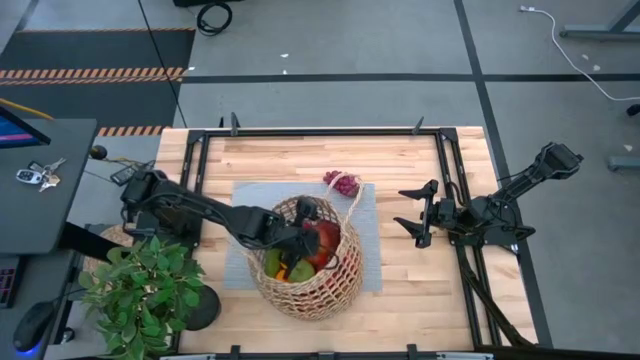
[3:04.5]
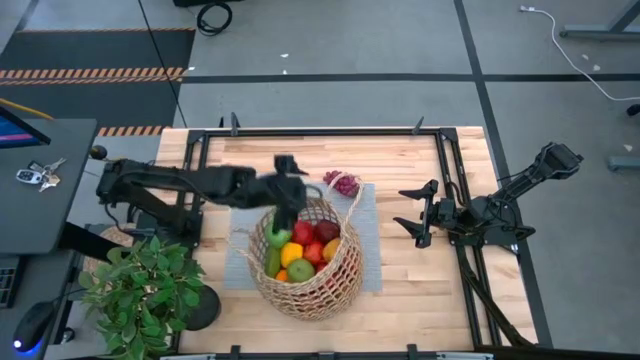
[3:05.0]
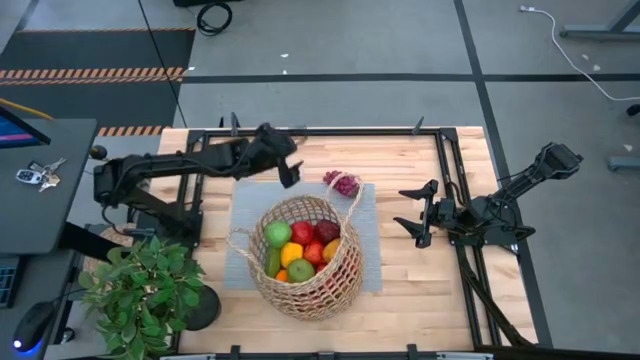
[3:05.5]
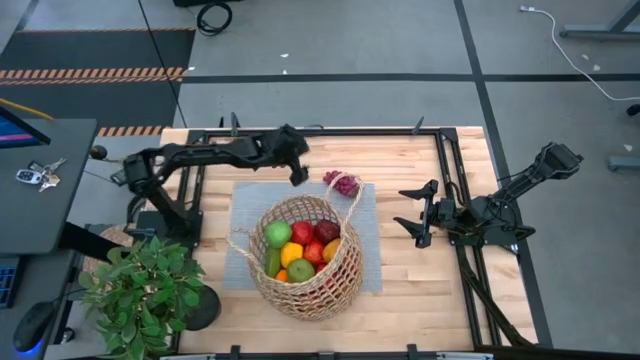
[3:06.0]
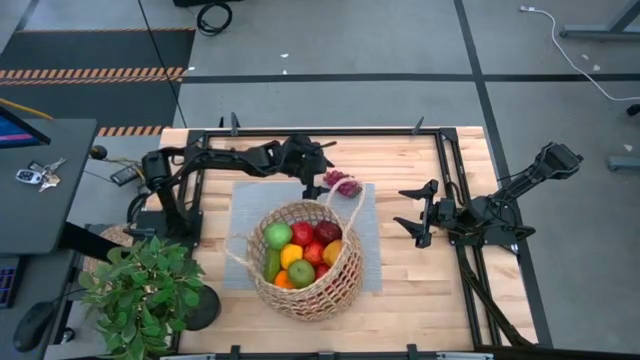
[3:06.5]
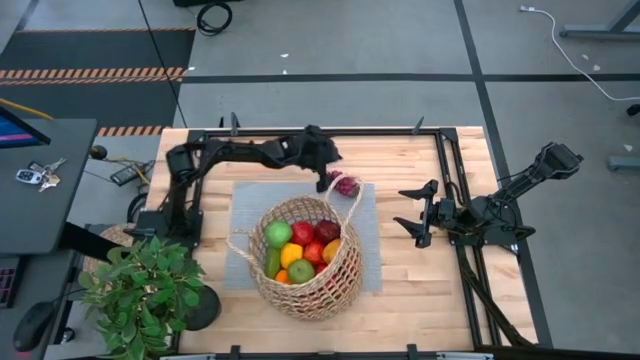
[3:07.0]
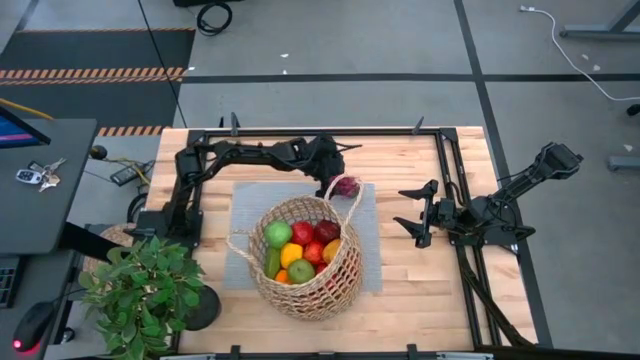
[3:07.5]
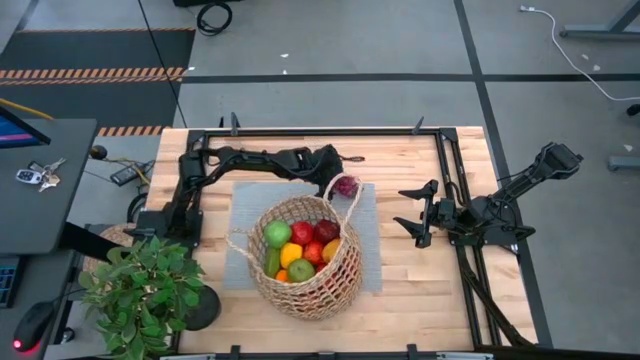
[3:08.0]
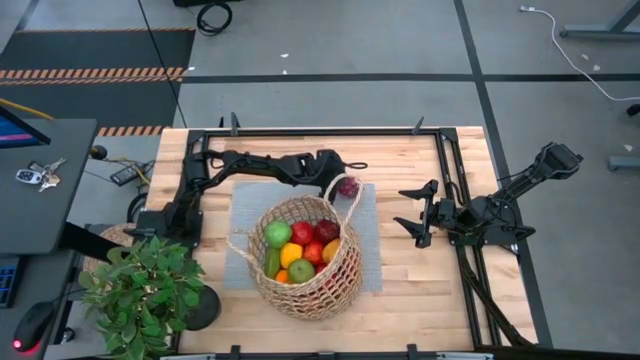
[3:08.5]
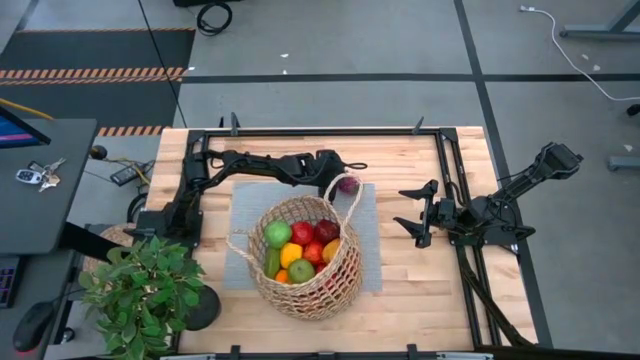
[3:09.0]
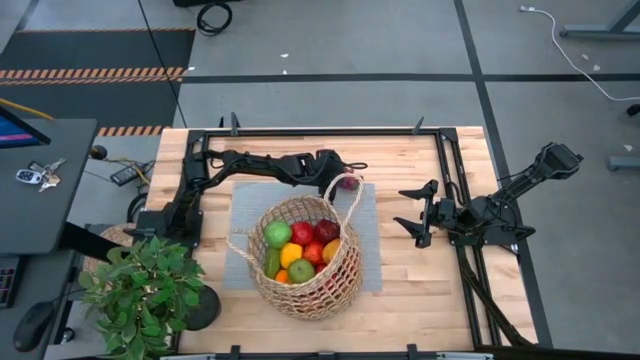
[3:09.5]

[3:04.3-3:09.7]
Task: Build produce basket
Put the pink grapes into the brown basket

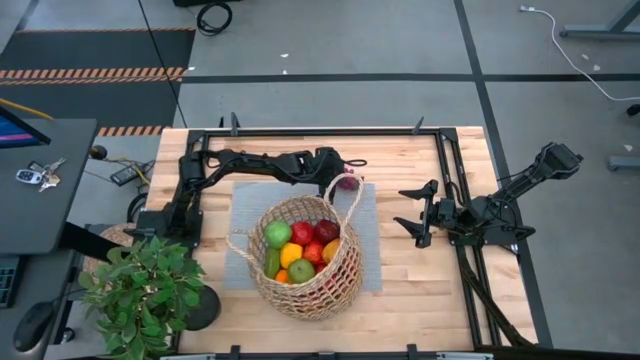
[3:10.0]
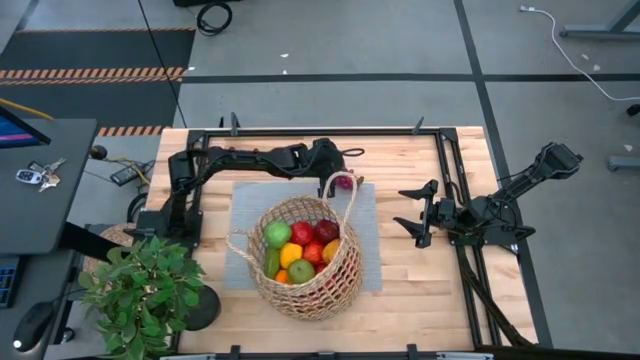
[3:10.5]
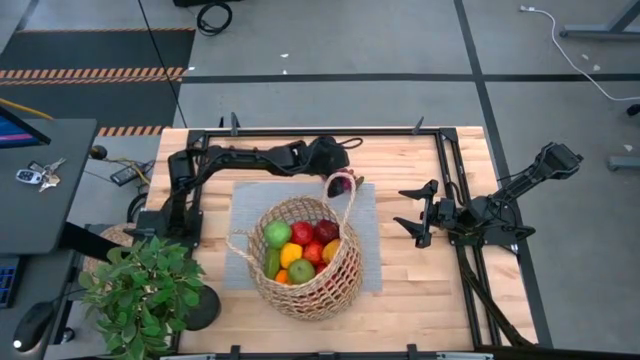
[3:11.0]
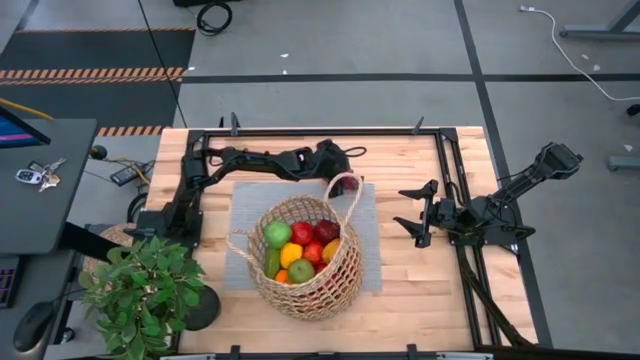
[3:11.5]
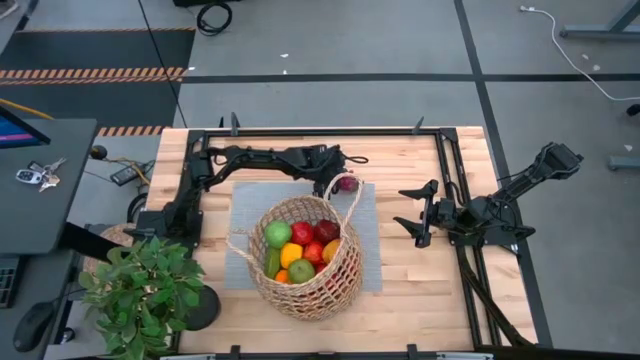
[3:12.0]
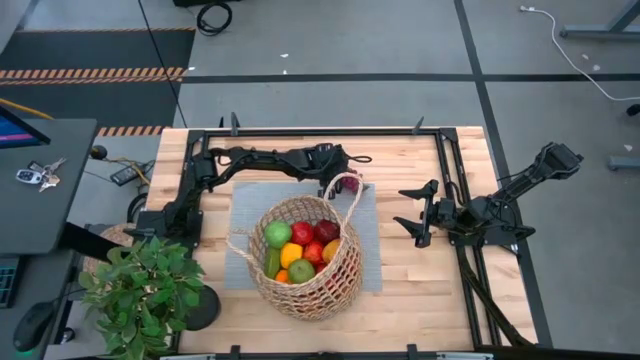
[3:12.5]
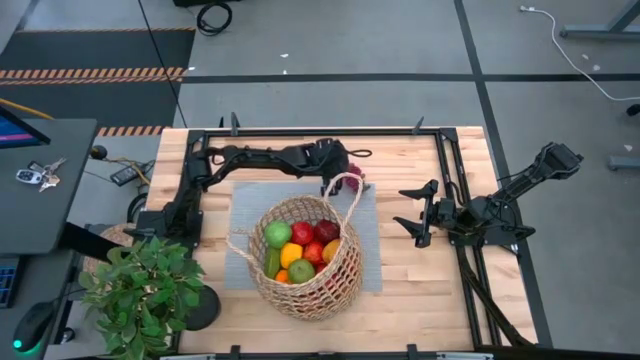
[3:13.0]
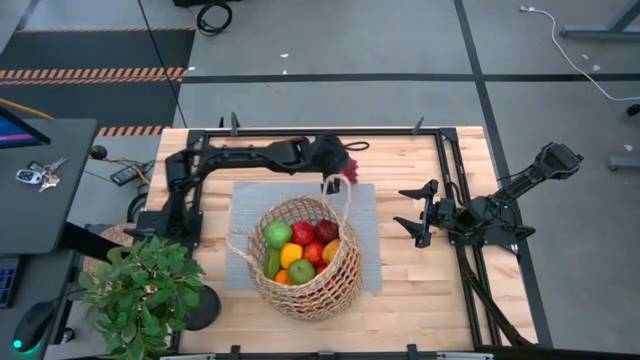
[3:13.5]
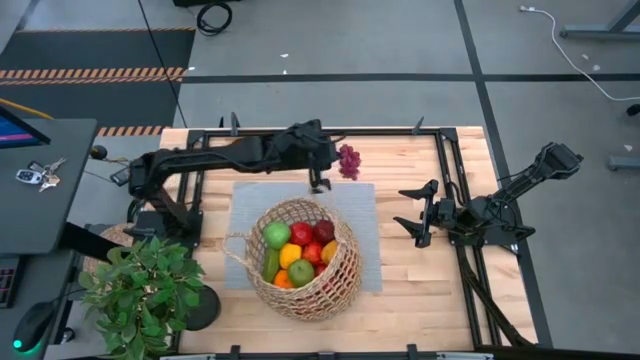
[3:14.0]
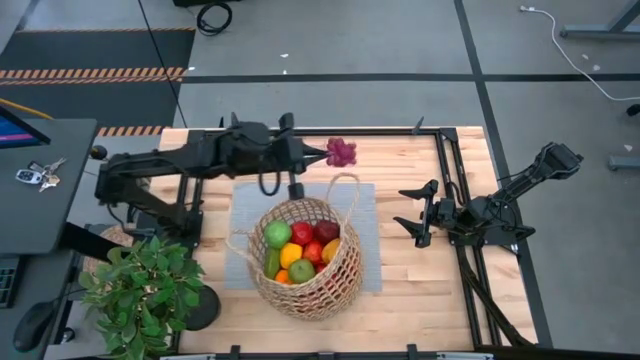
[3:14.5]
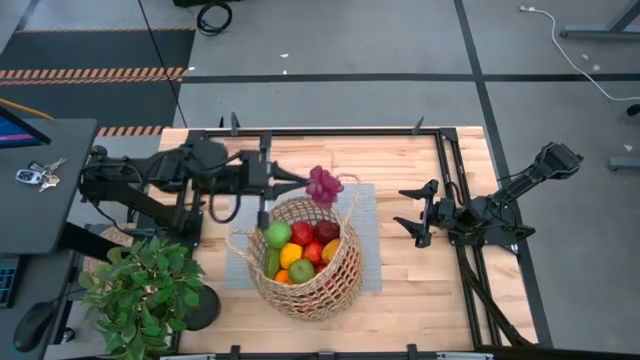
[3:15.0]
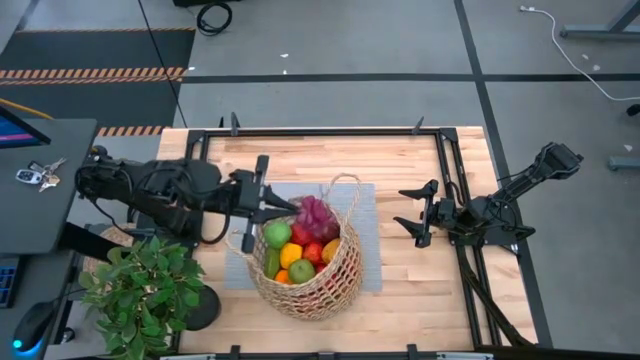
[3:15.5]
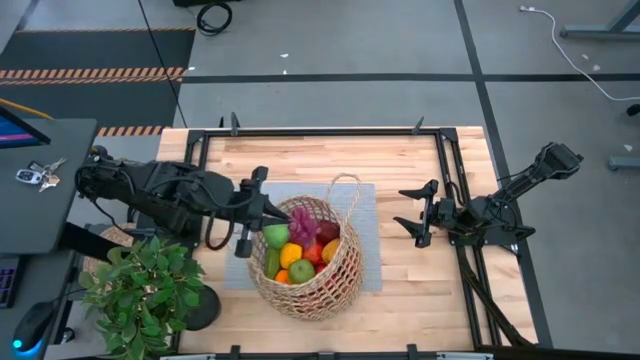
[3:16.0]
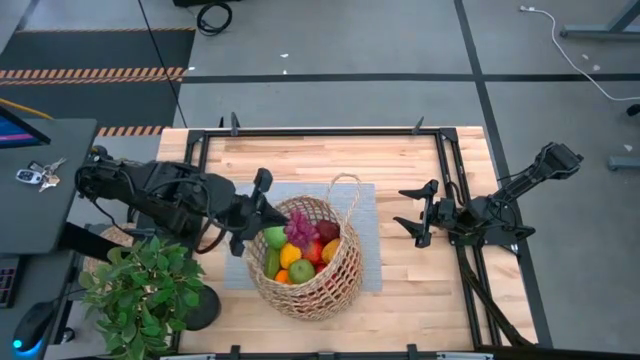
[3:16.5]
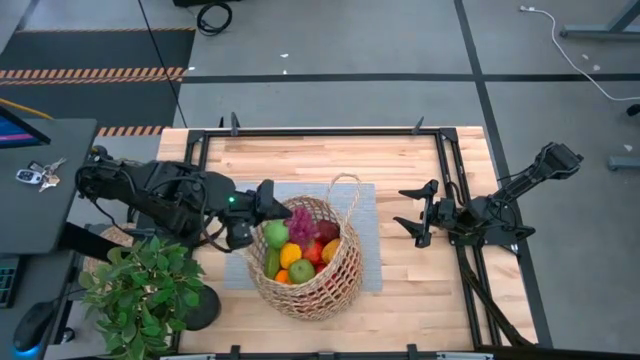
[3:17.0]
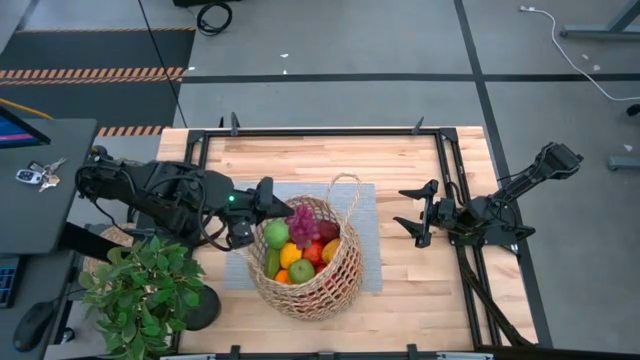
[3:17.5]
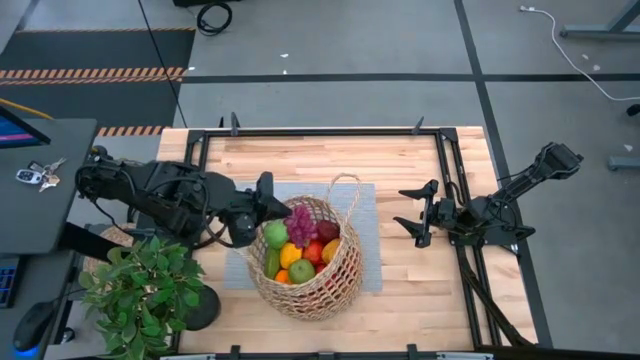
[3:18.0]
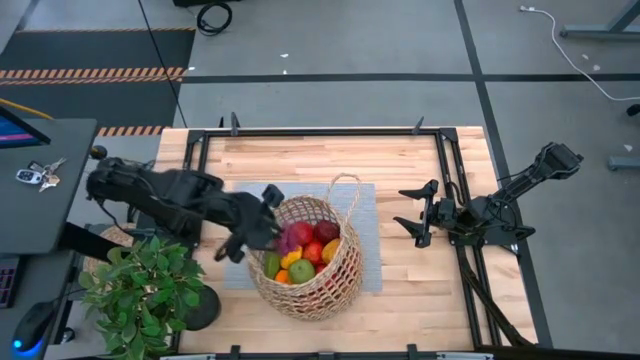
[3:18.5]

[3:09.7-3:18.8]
Put the pink grapes into the brown basket

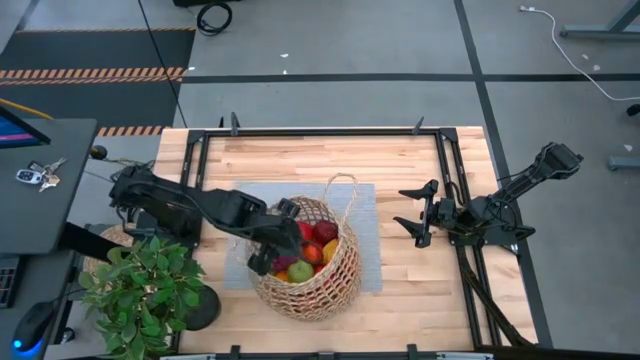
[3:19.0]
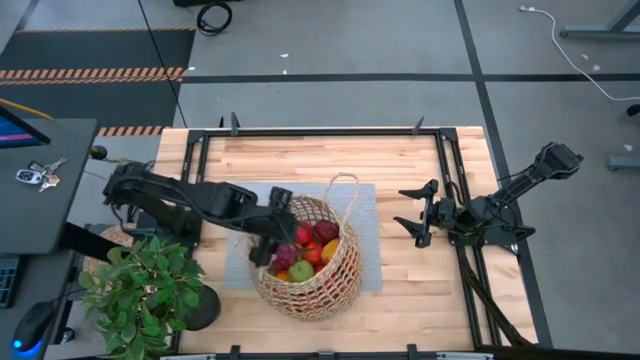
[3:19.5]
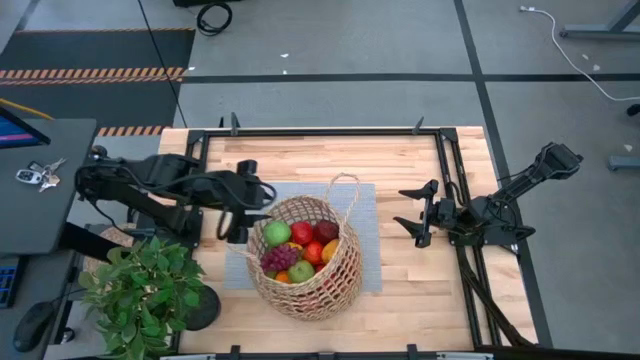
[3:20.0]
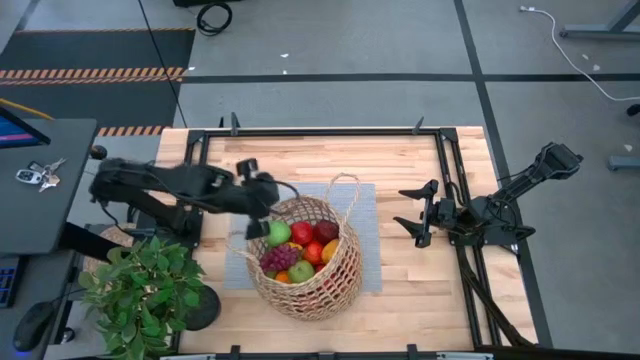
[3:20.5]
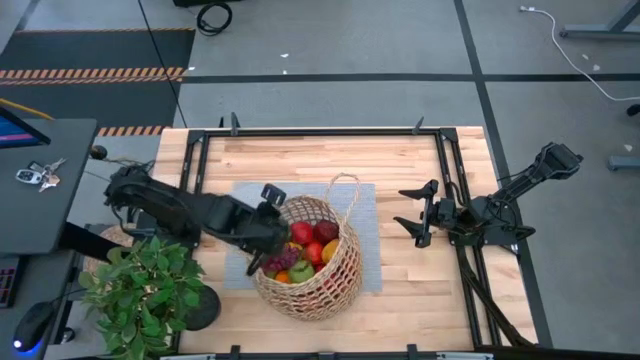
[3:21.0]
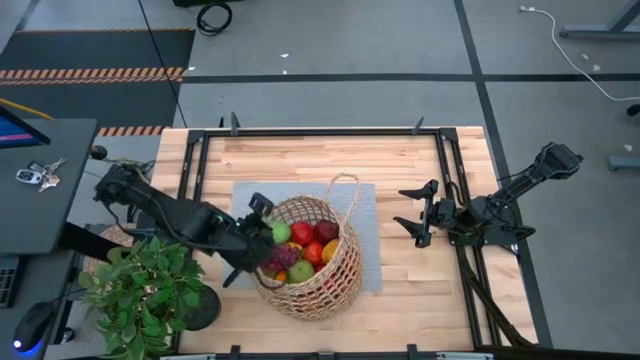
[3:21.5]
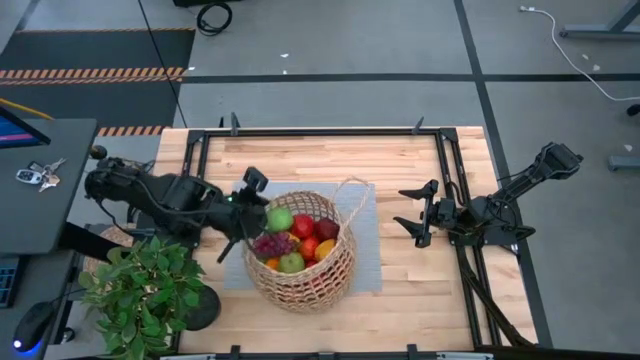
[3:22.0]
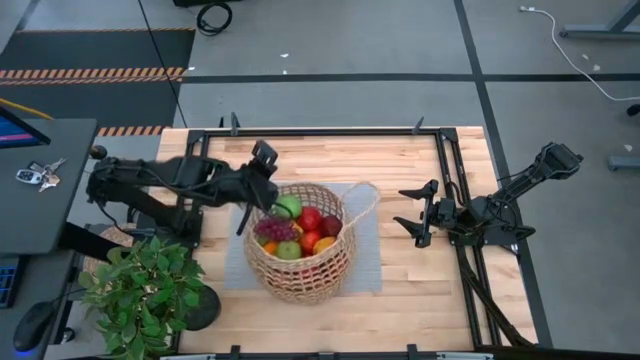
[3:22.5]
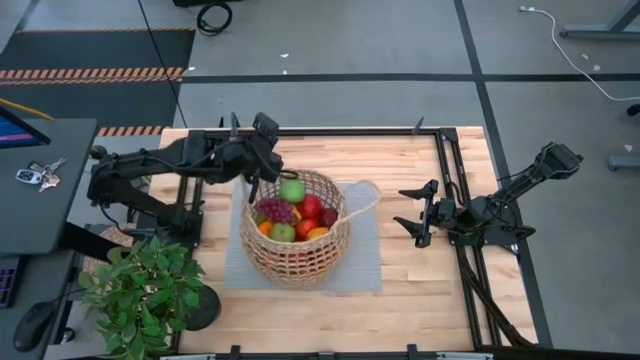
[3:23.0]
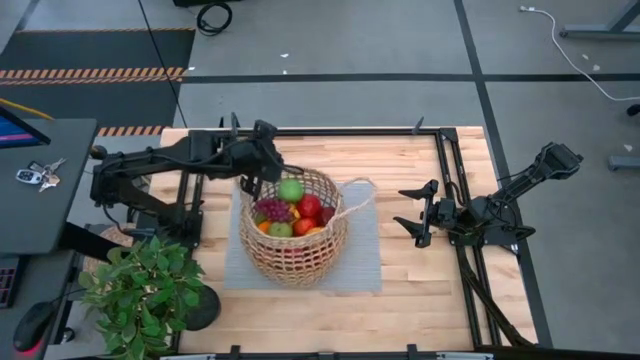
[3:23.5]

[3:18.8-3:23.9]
Adjust the brown basket

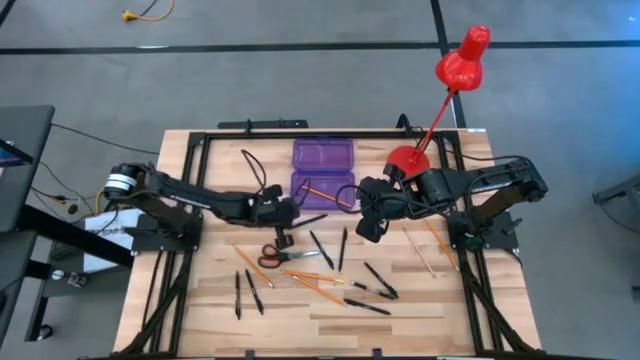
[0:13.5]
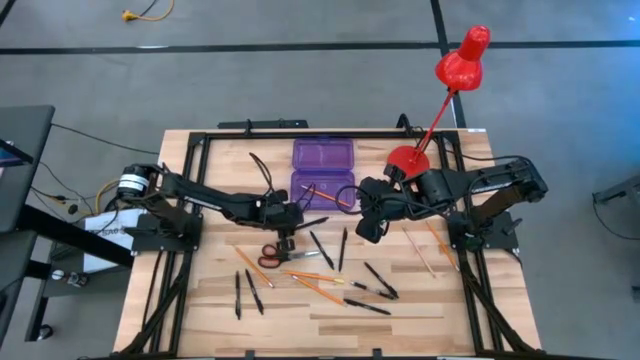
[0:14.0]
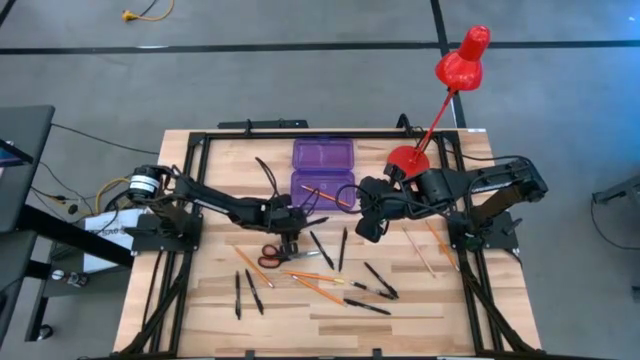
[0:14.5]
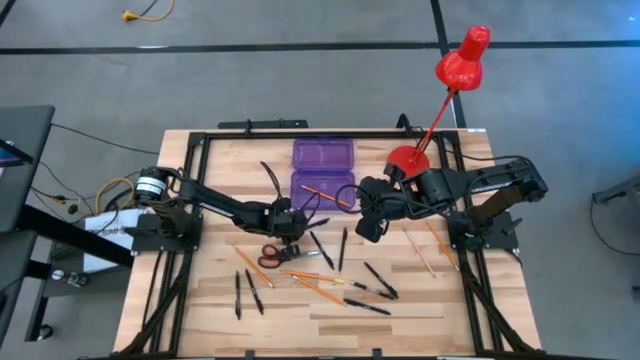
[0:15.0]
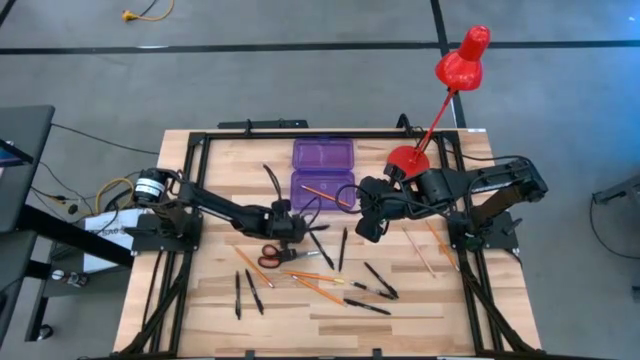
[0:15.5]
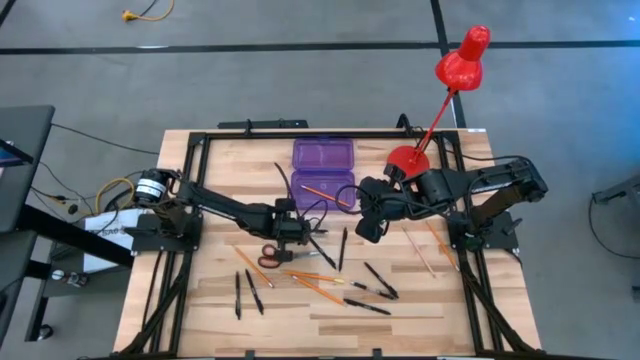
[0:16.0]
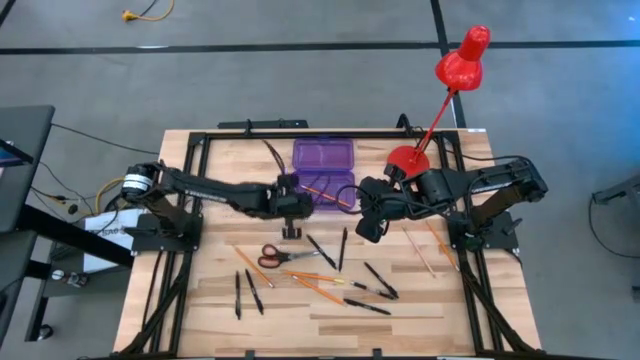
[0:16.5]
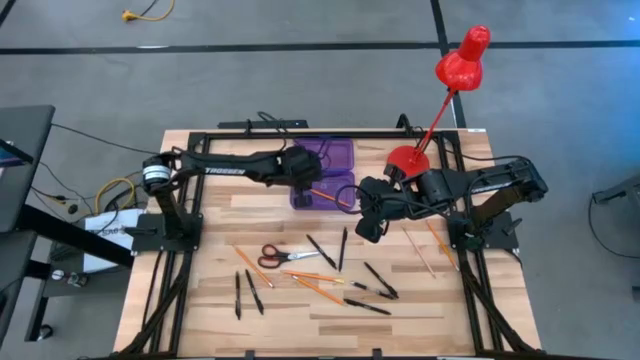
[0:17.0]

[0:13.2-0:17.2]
Task: Pick & place school supplies into a supply box
Put the black pen into the purple supply box
